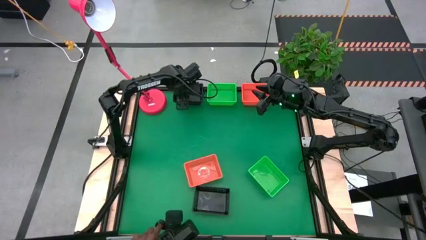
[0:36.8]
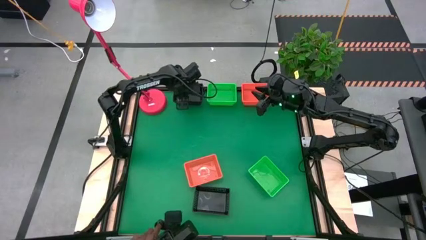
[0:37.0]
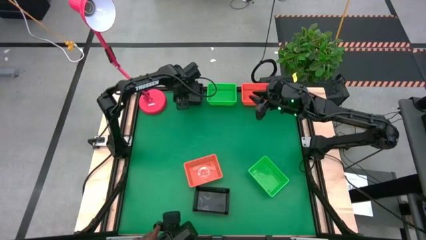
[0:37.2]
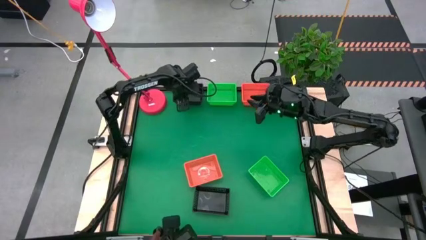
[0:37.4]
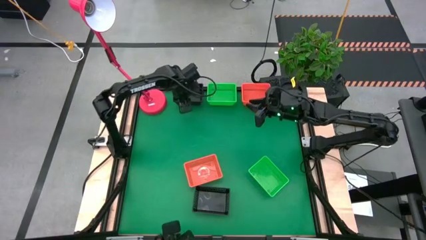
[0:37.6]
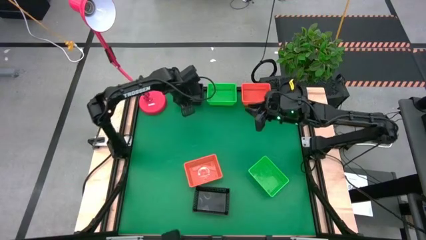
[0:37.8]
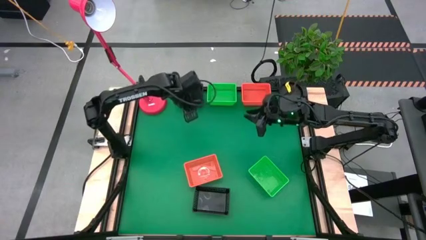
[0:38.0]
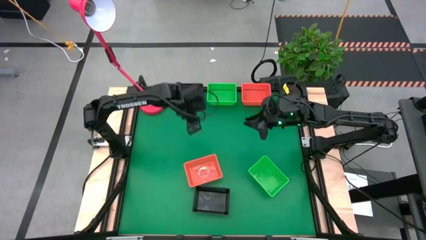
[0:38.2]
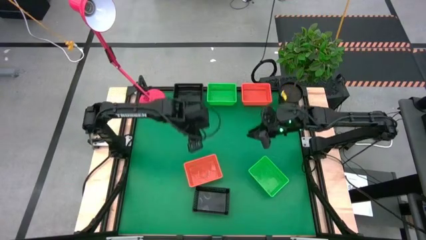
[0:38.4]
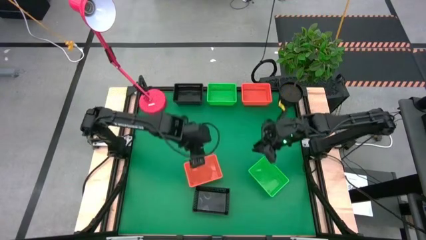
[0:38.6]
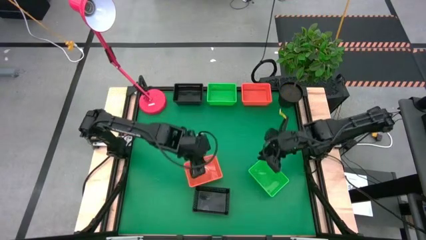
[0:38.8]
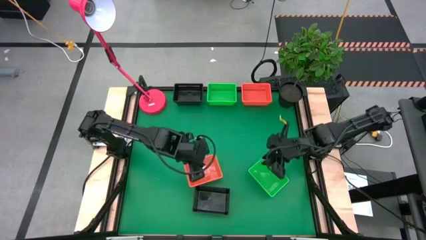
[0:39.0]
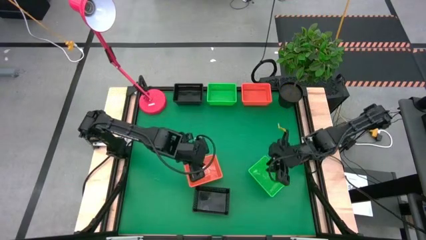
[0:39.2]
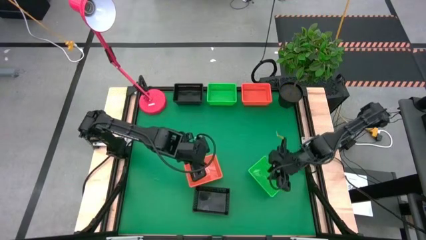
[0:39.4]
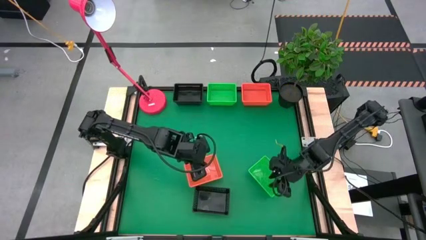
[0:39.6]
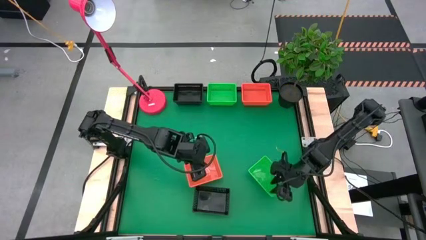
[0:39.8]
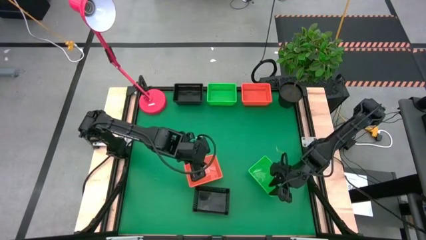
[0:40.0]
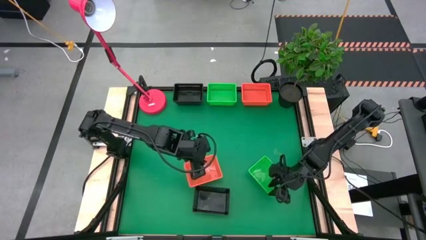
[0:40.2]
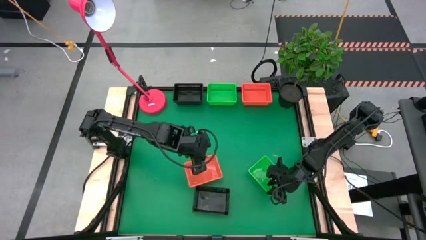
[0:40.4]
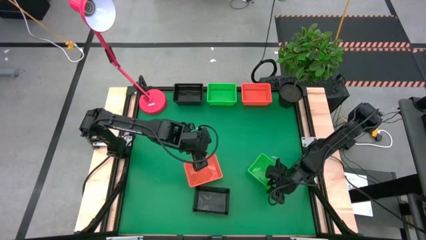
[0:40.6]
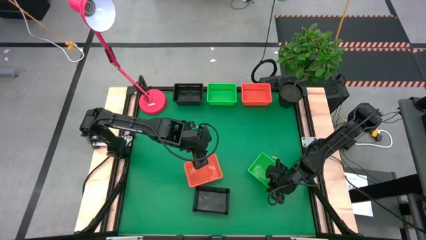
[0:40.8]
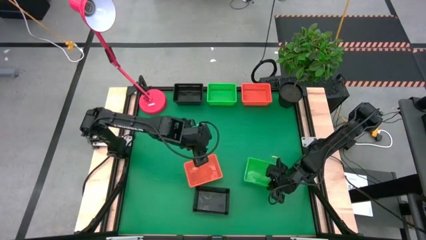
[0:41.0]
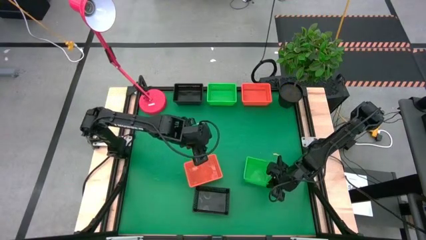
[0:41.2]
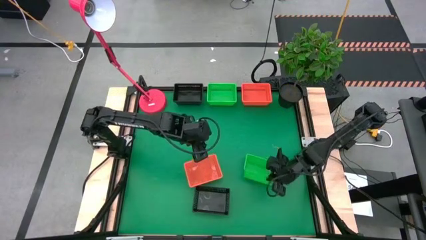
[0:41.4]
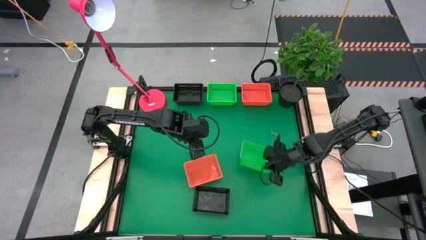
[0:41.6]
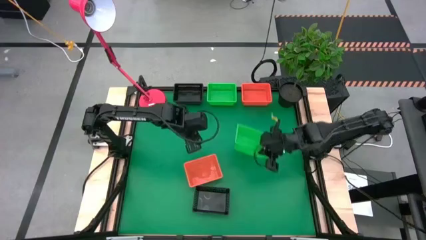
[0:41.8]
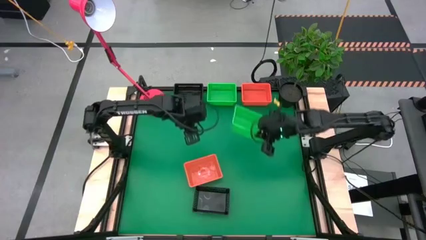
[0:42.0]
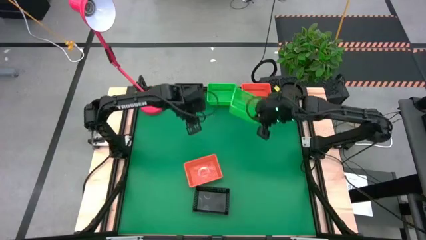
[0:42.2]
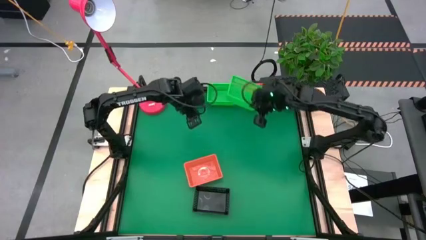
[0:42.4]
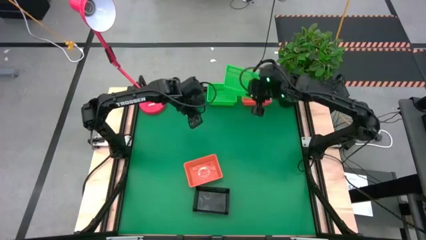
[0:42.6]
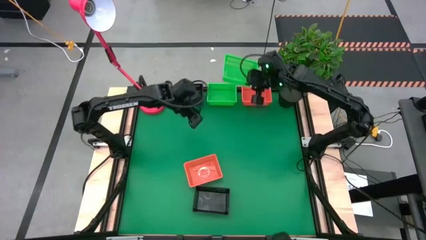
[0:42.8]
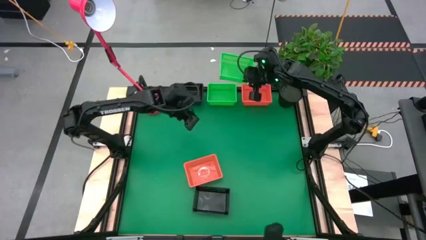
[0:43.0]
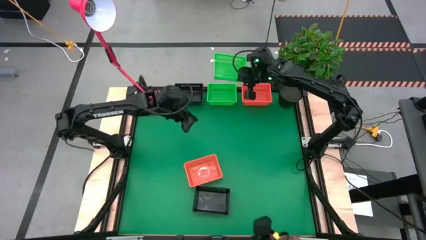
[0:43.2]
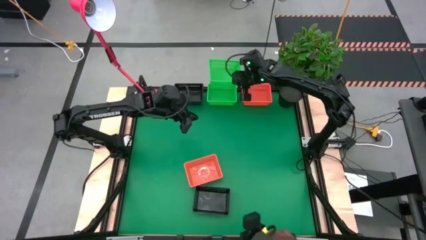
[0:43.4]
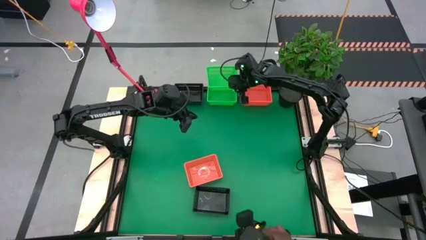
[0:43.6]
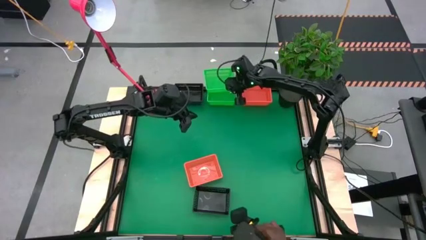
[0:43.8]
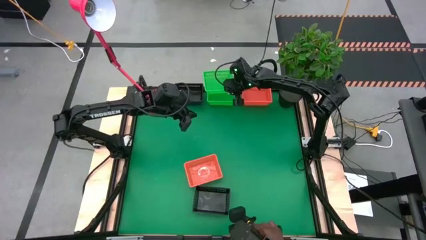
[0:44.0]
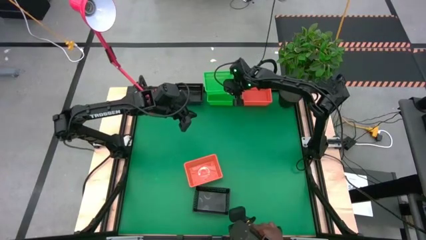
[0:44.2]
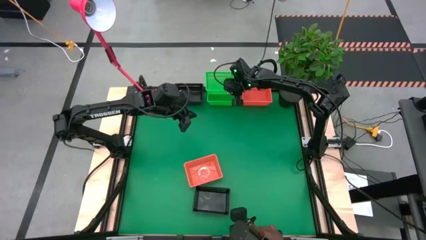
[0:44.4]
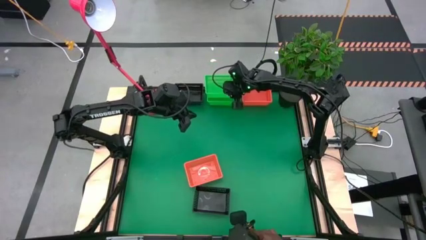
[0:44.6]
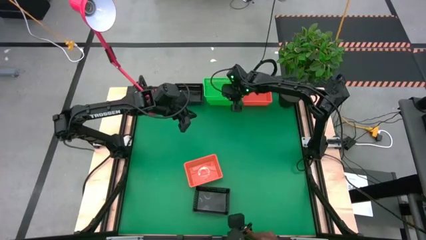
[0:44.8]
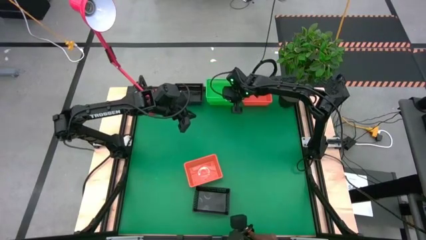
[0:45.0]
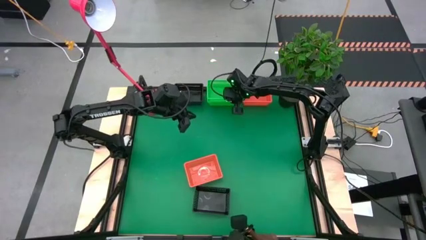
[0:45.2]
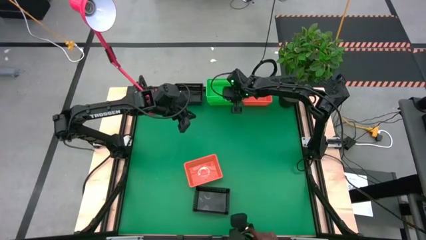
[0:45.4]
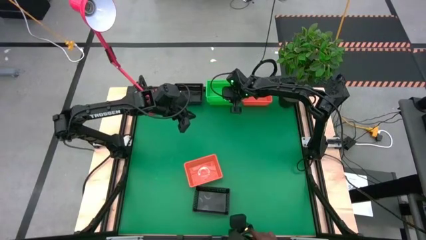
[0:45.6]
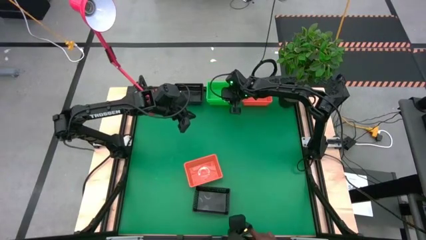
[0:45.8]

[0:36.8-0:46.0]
Stack the bottom green bin on top of the top green bins

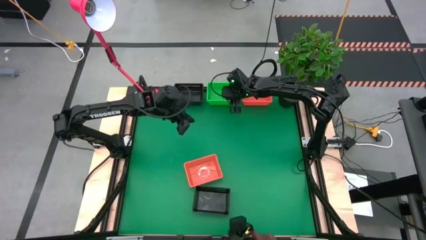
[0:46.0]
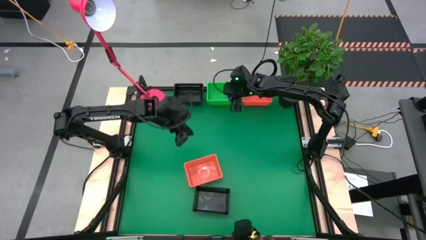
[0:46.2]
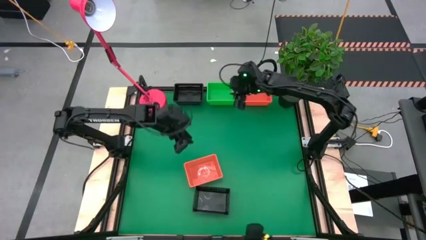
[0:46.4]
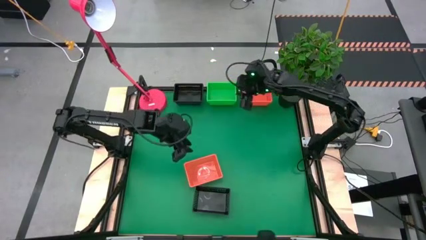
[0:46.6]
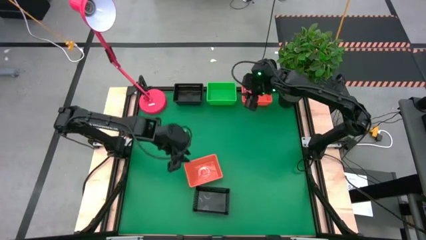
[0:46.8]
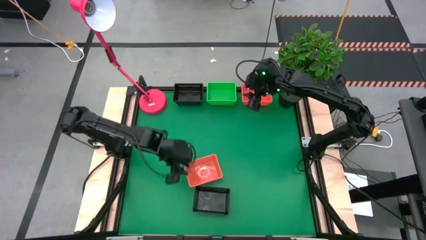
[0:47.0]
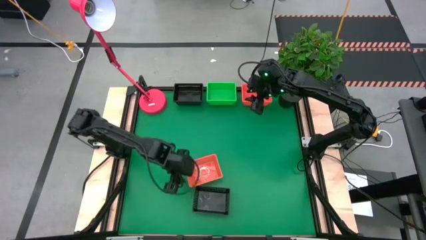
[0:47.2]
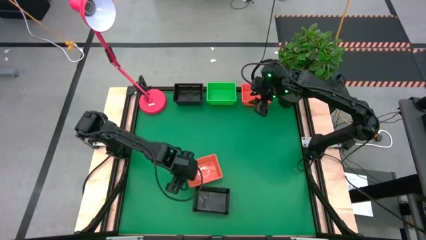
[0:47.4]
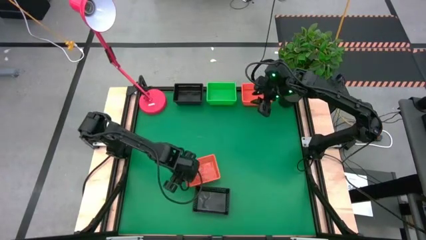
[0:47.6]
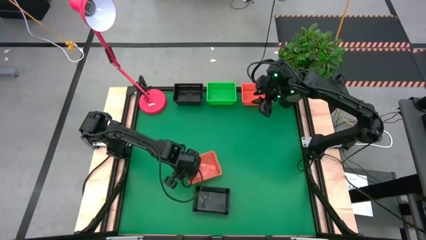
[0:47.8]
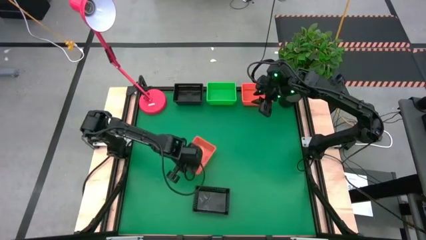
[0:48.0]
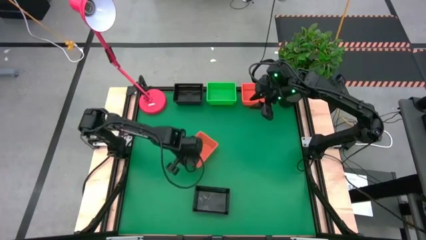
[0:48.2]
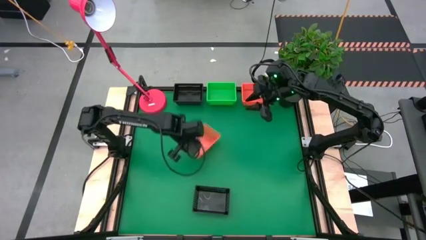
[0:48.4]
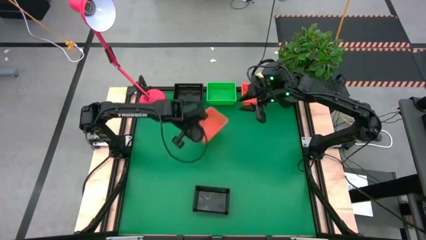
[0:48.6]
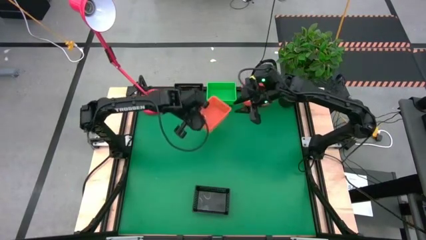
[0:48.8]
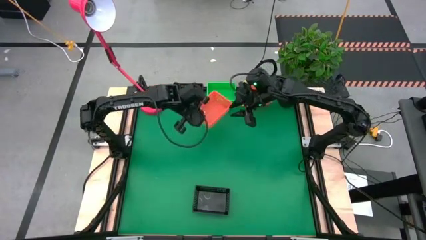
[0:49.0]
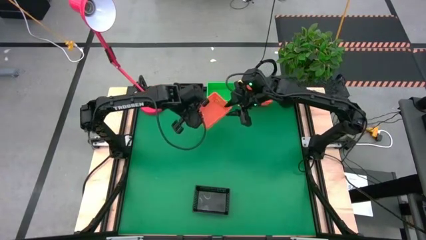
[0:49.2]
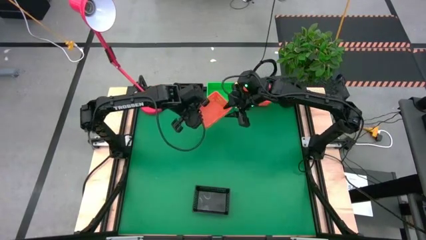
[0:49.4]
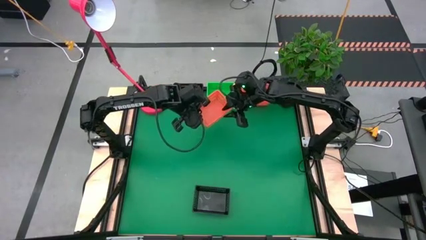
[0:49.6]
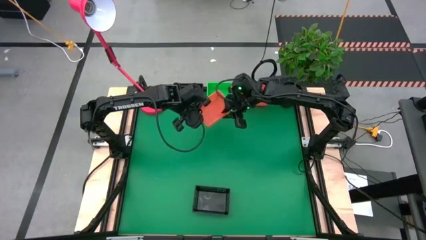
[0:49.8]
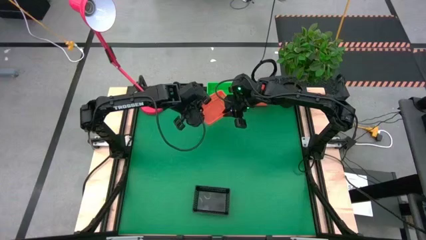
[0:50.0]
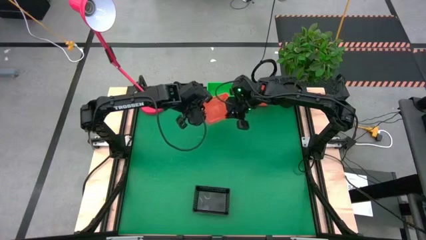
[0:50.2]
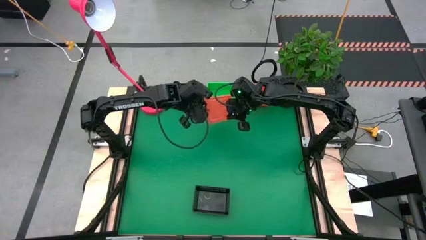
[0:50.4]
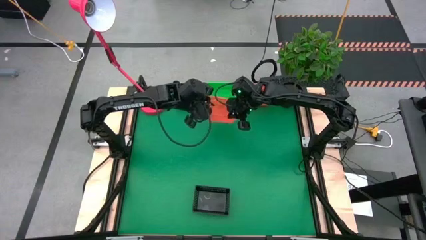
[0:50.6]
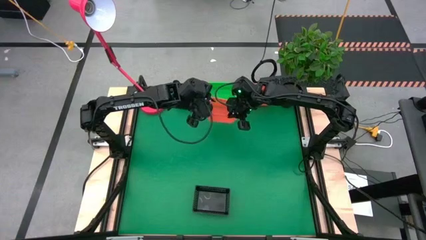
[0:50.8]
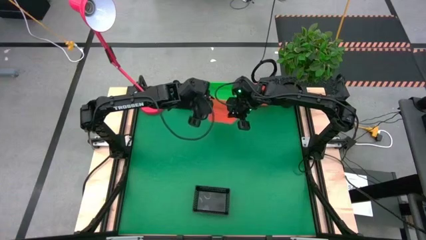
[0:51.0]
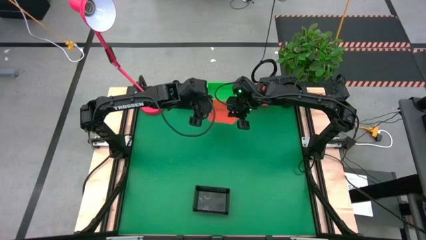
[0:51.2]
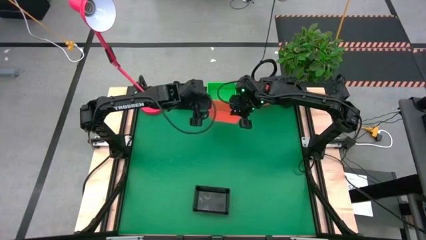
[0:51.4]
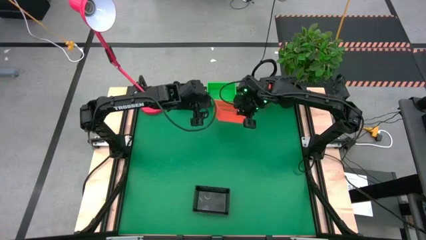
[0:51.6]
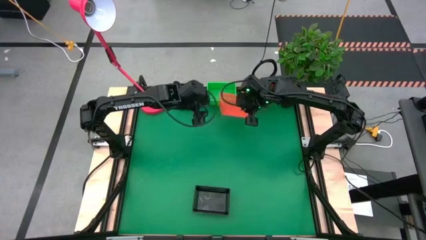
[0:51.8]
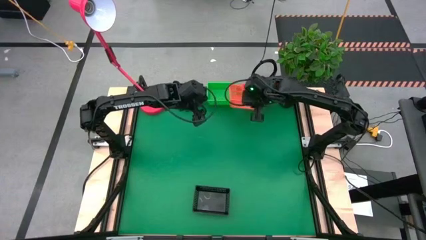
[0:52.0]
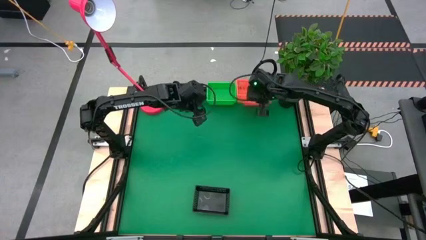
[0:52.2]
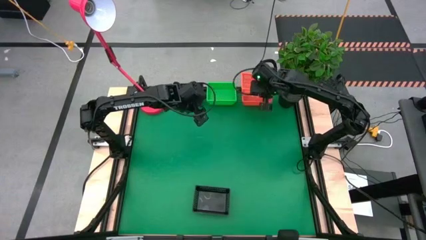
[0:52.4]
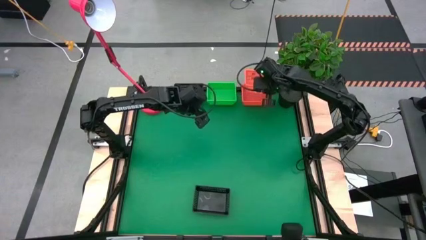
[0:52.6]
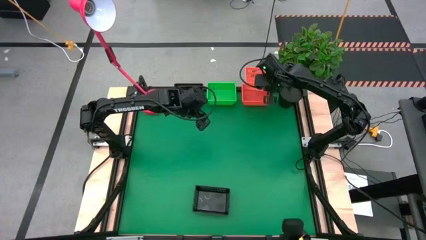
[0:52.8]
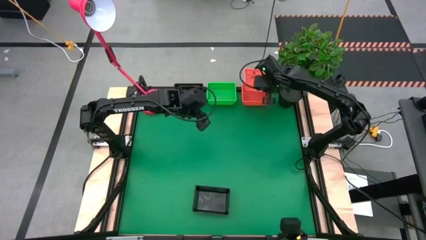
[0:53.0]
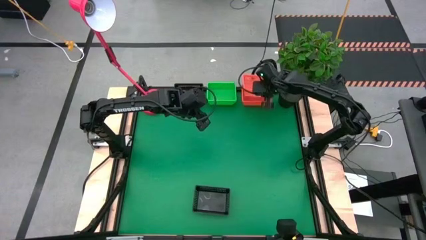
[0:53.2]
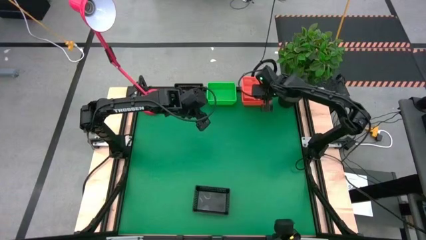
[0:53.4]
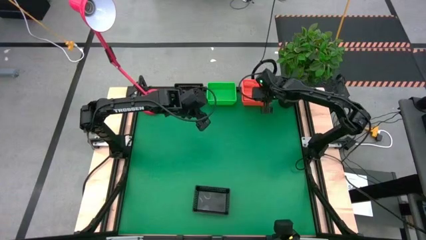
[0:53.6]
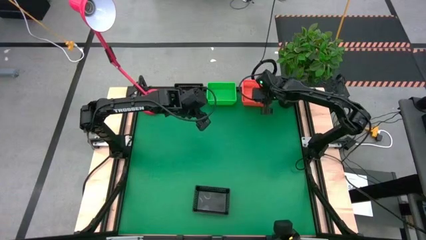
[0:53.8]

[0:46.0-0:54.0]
Stack the bottom orange bin on top of the top orange bins
